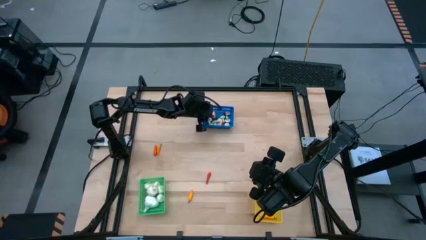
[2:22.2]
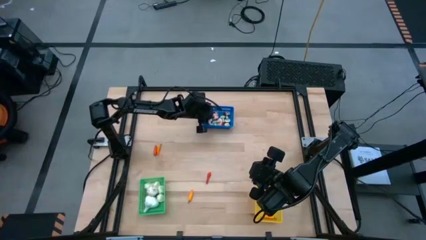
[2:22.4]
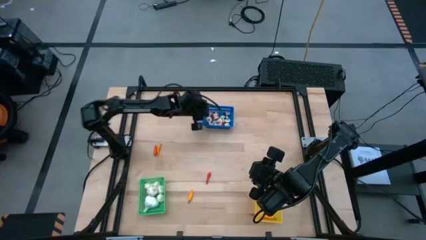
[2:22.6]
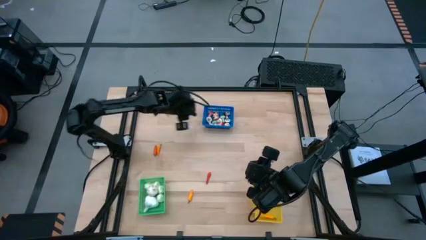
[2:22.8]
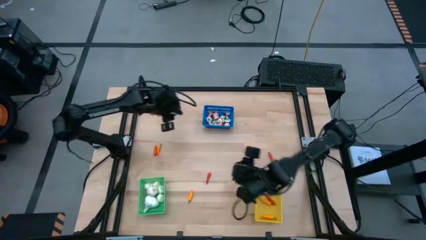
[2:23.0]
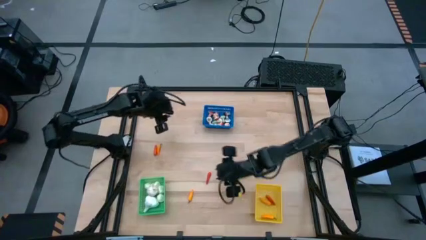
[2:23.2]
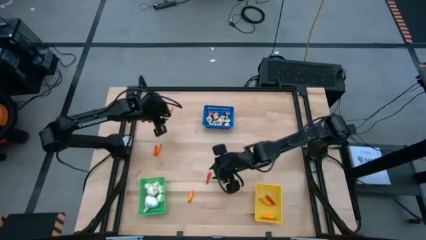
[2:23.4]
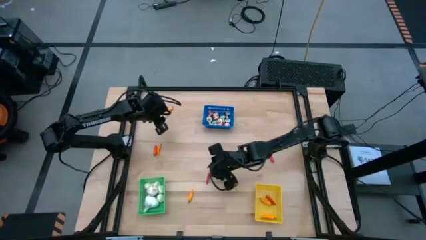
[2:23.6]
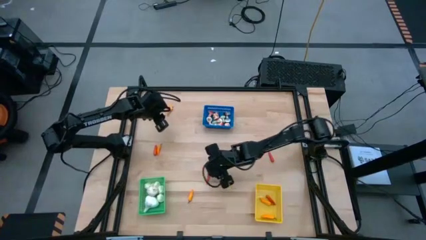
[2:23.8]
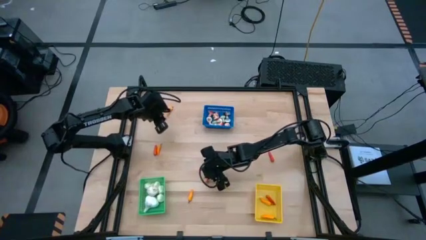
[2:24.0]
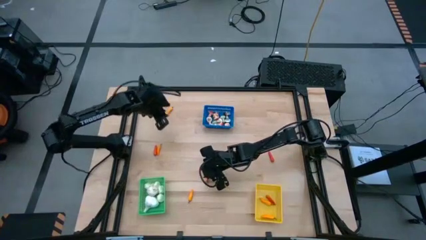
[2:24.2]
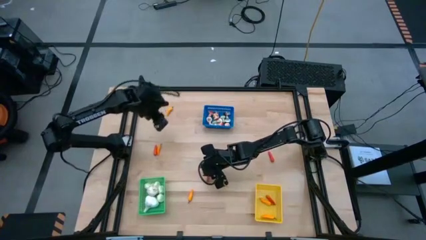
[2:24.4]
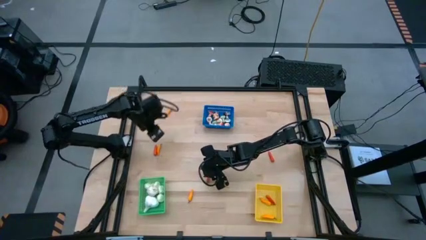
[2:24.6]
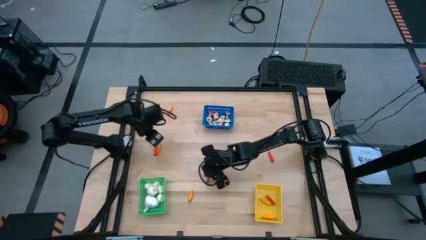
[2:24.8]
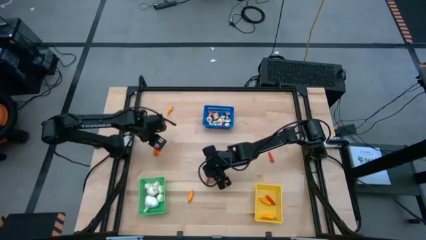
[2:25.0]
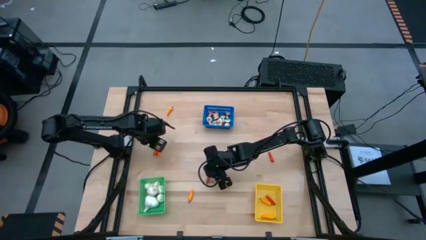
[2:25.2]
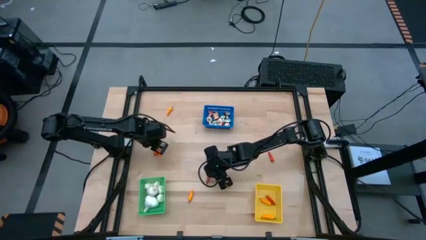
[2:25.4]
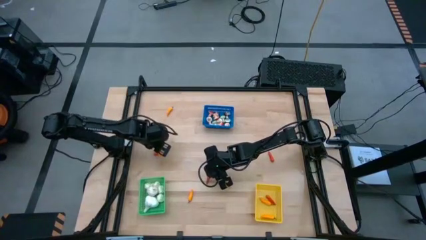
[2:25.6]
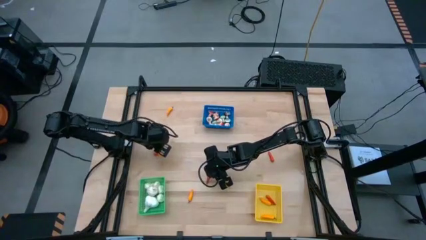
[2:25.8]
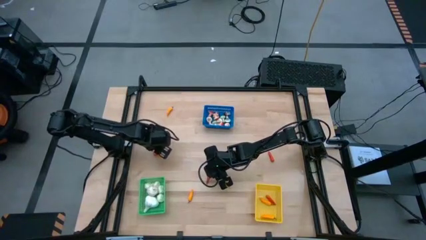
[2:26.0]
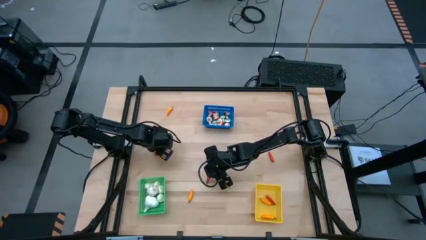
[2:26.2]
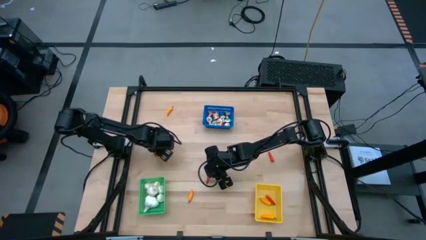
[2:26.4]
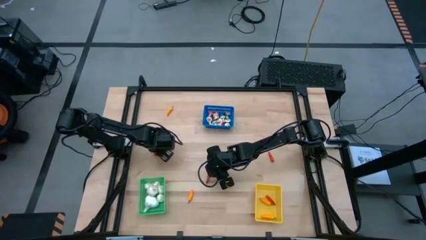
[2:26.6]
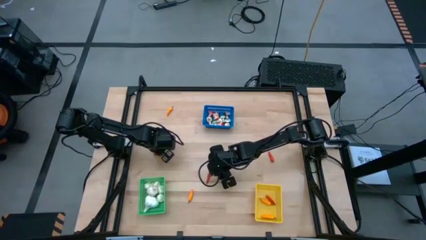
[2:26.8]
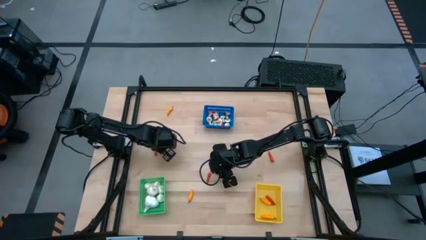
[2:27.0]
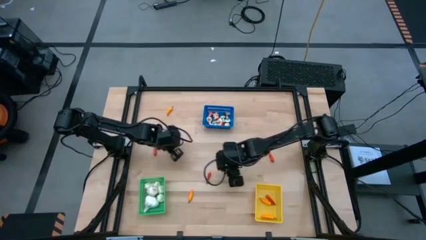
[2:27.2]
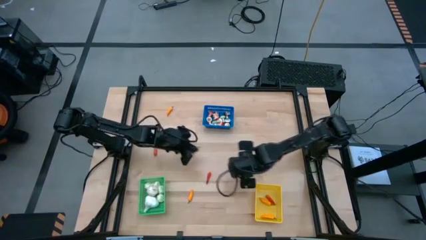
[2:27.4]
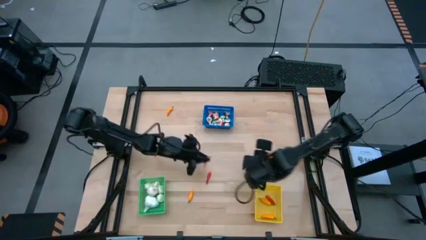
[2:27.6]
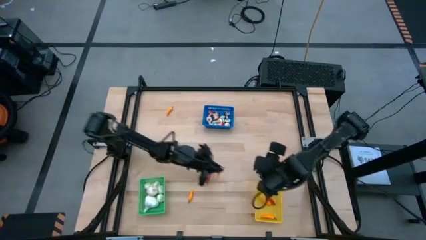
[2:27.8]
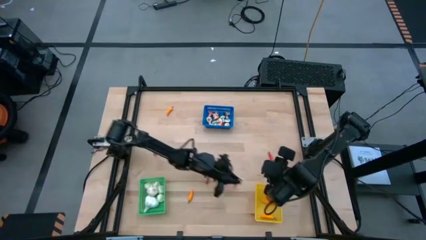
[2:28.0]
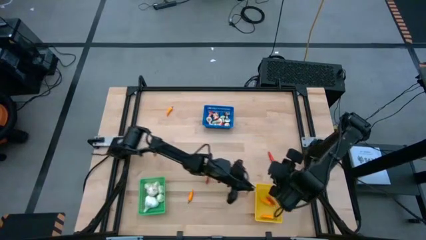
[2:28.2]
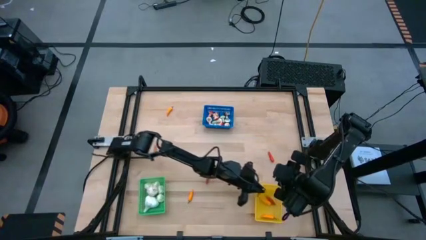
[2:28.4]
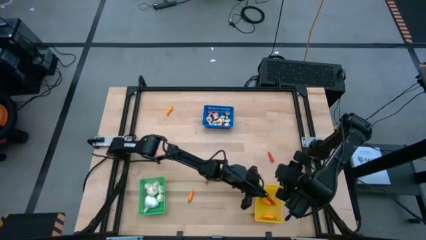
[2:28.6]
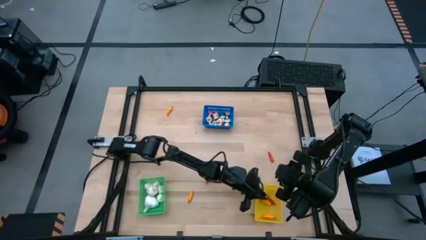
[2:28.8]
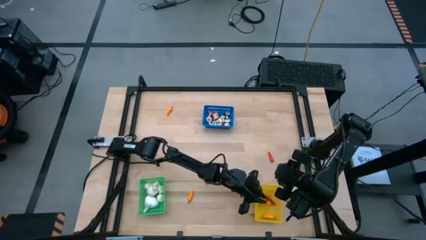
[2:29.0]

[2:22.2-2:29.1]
Task: Sort produce into baskets
Put the yellow chili pepper into the yellow bin

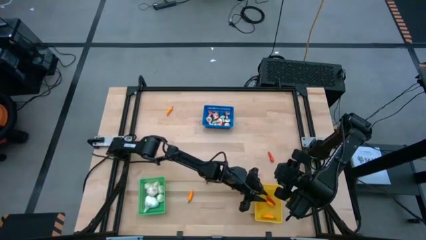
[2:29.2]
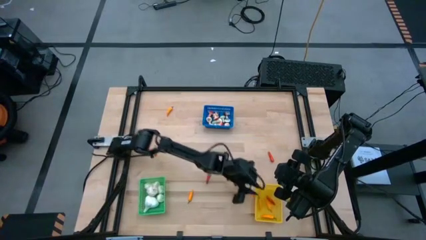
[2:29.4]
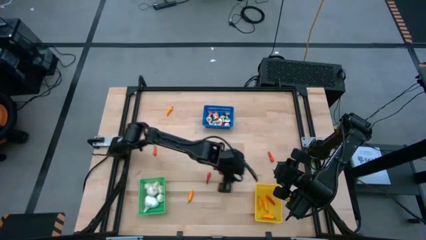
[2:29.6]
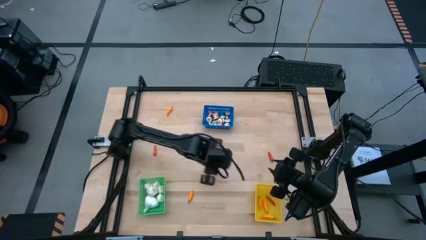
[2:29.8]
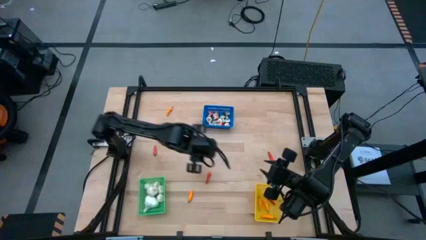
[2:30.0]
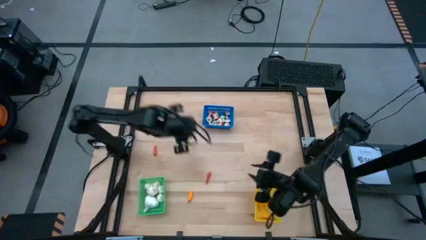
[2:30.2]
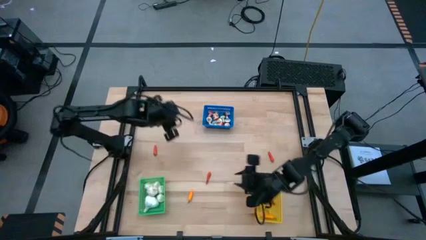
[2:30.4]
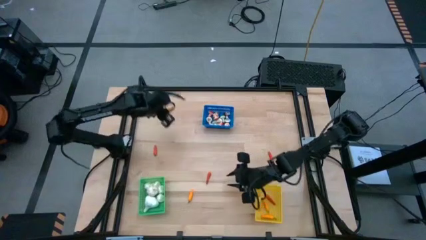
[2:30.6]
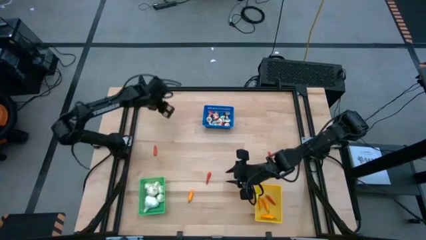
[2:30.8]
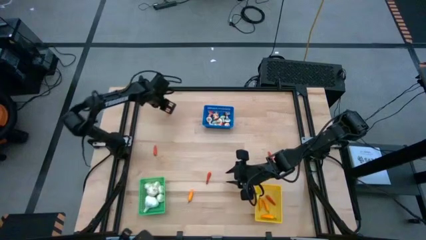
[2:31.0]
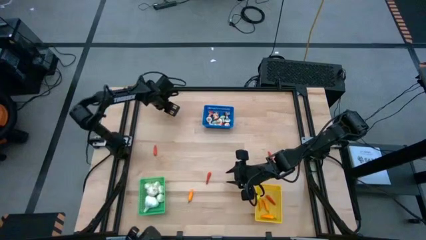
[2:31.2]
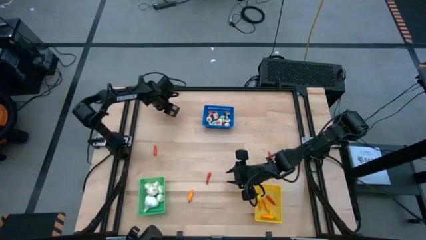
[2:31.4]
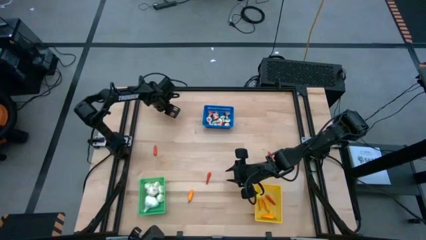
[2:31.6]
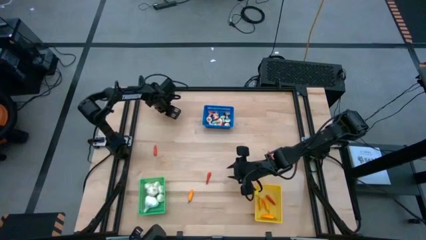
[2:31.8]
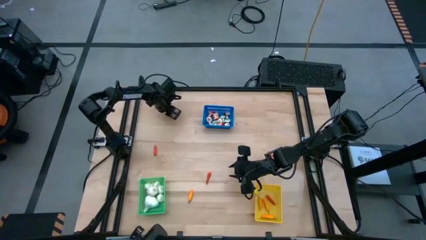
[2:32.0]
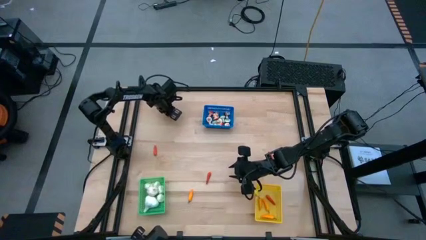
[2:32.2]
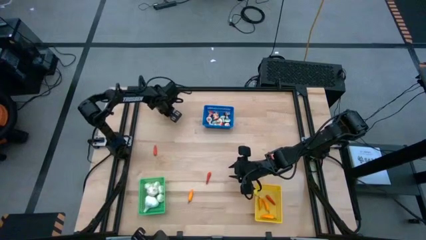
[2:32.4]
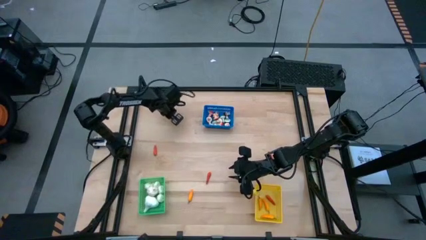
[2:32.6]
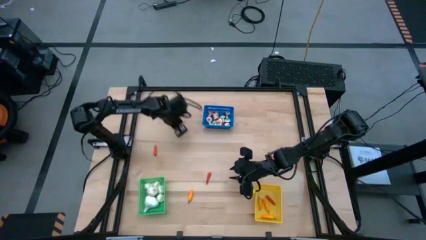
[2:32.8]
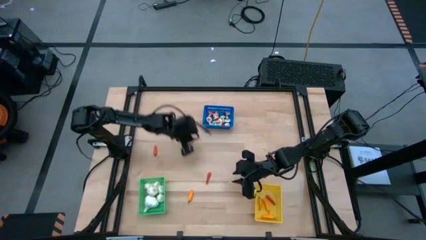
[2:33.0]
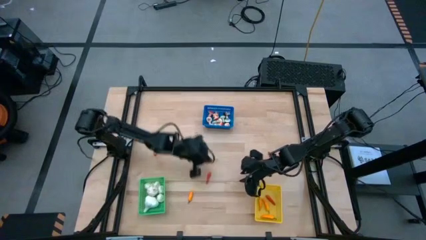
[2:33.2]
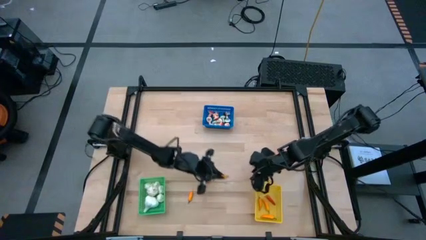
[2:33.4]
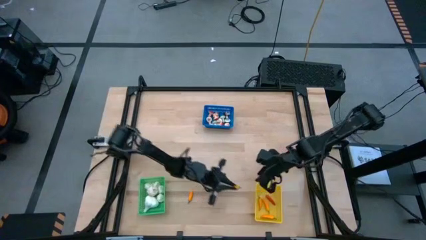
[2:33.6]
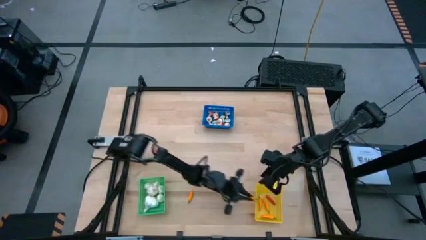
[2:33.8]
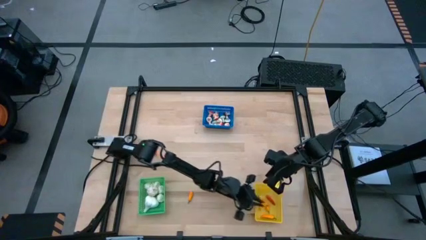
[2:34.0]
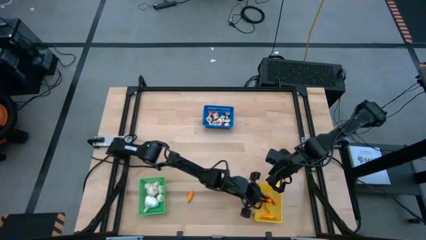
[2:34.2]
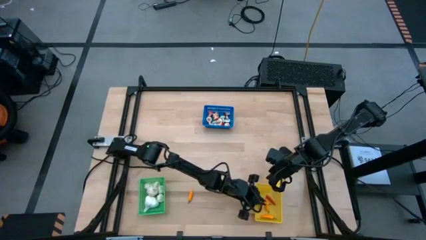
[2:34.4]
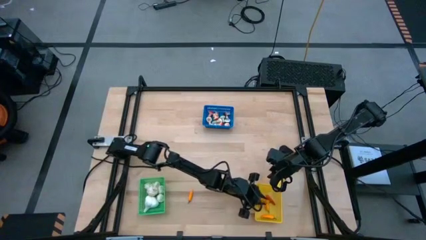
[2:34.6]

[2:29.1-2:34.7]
Put the yellow chili pepper into the yellow bin

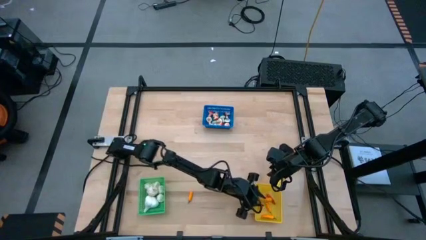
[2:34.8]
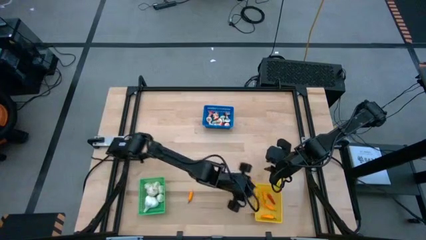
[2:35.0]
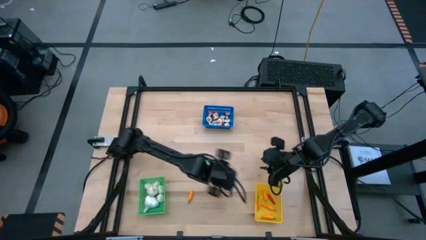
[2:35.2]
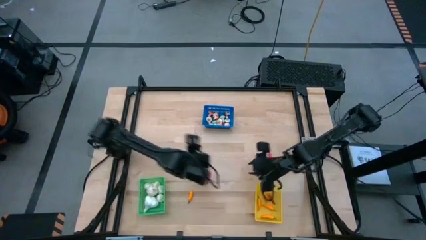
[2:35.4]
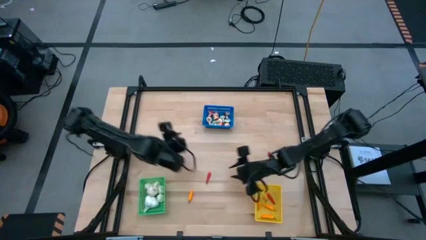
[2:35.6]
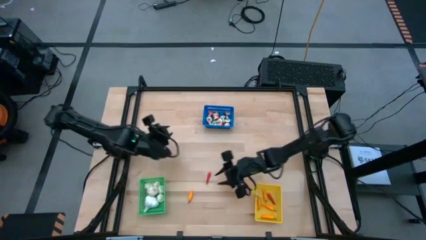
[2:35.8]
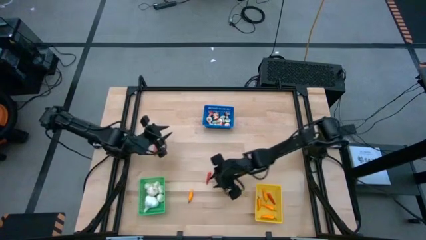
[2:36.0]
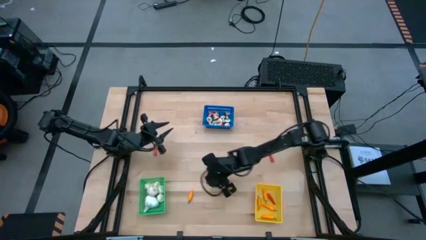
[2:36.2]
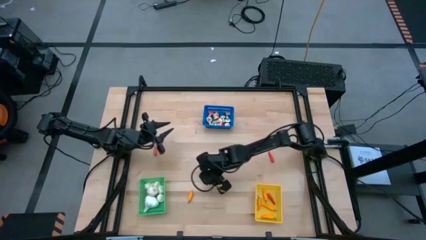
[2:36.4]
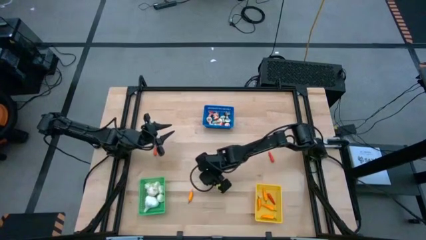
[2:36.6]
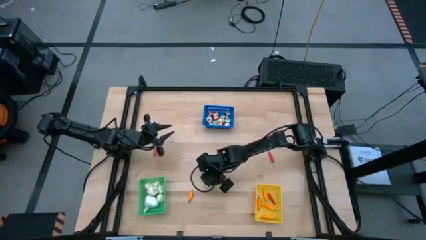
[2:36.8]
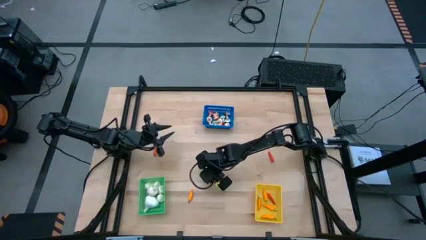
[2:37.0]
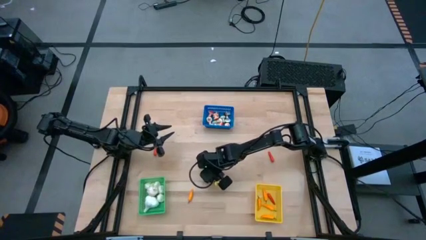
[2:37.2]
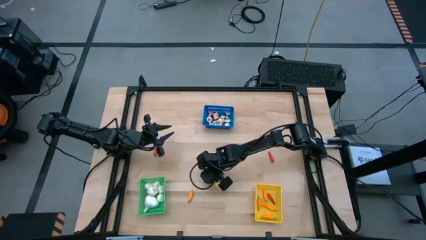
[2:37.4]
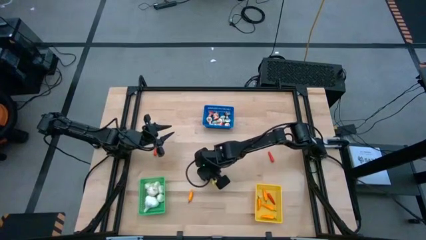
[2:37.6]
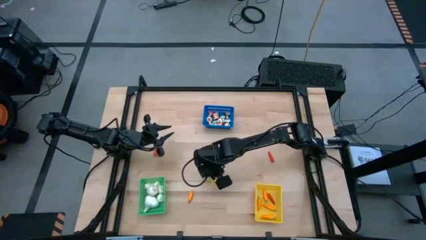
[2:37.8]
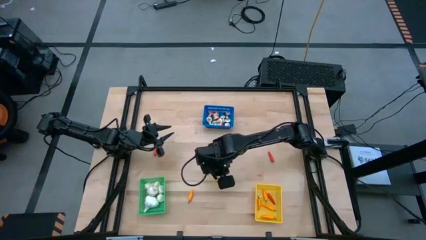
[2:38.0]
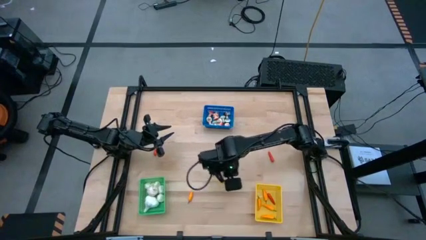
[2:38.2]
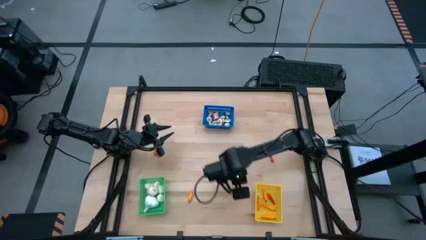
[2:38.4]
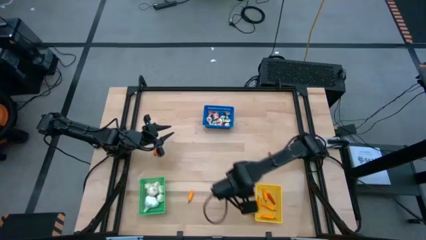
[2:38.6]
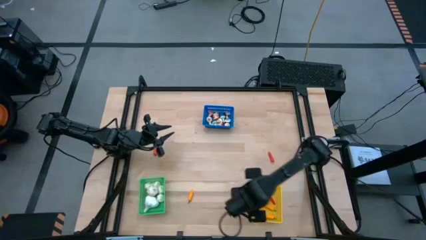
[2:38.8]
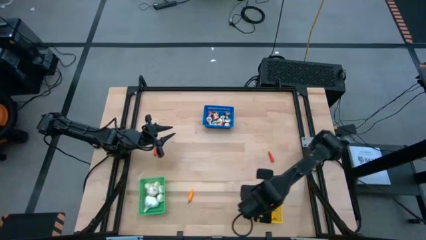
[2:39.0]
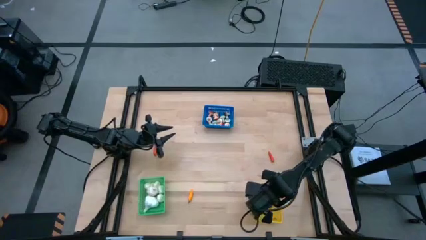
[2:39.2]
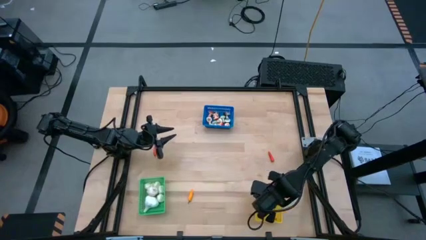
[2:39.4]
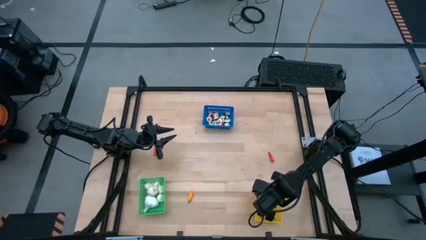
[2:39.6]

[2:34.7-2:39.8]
Put the orange chili pepper into the yellow bin
